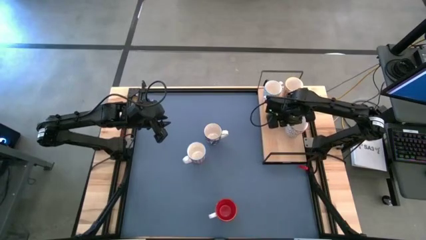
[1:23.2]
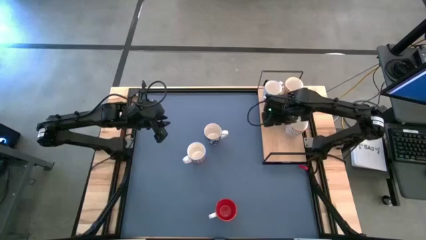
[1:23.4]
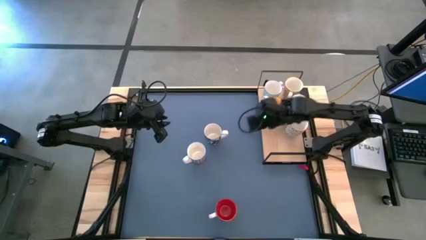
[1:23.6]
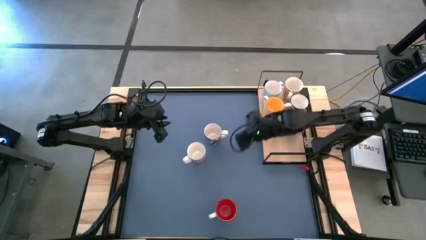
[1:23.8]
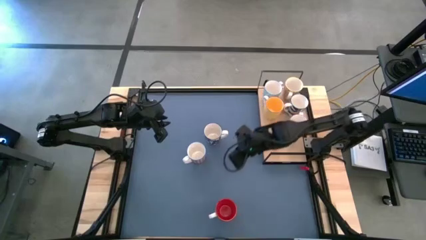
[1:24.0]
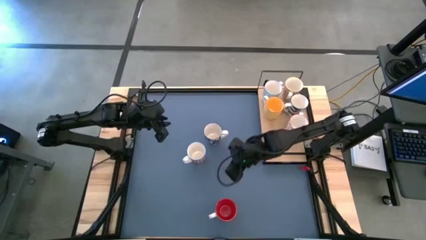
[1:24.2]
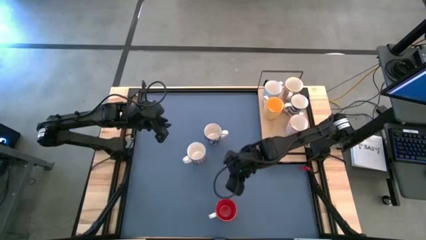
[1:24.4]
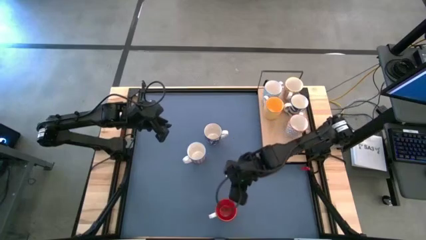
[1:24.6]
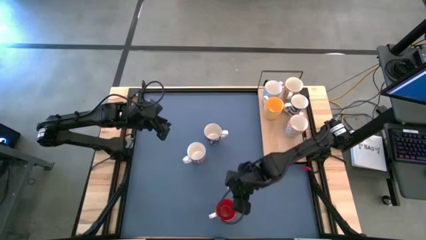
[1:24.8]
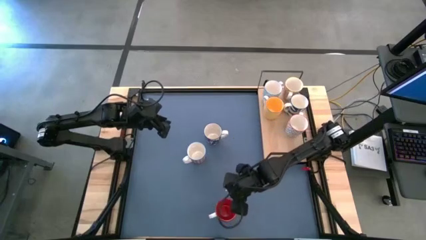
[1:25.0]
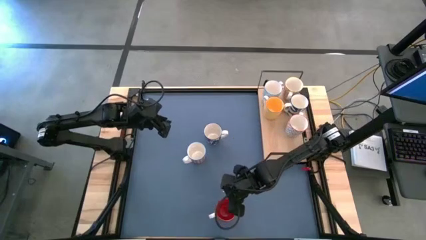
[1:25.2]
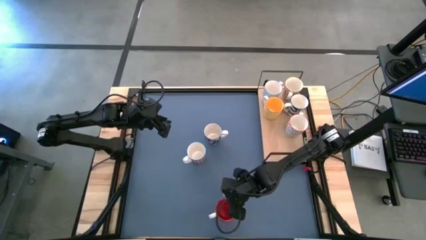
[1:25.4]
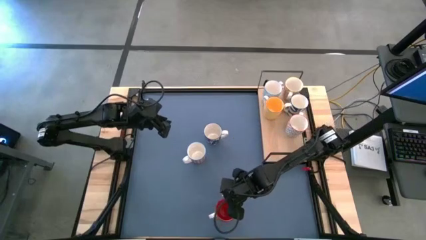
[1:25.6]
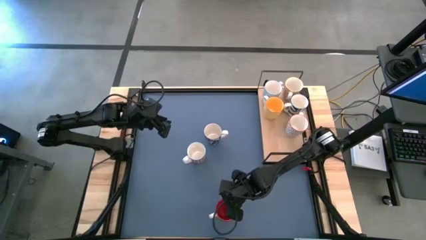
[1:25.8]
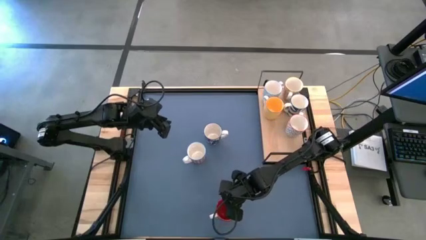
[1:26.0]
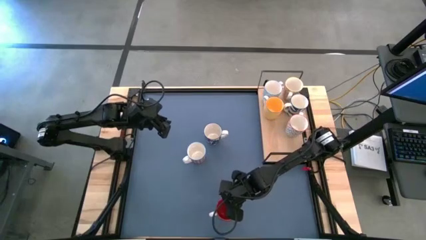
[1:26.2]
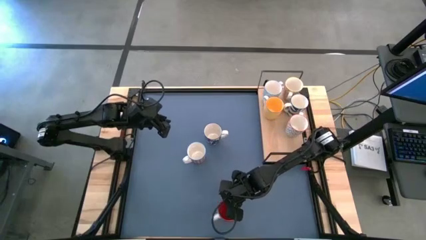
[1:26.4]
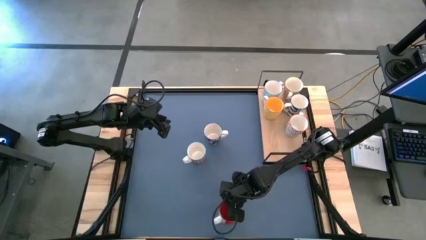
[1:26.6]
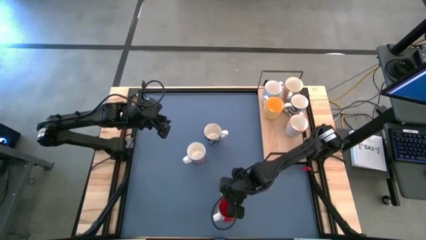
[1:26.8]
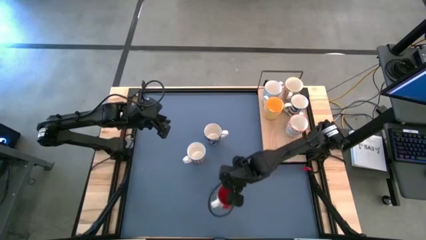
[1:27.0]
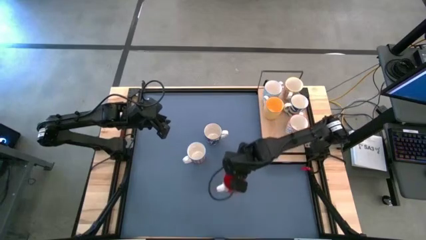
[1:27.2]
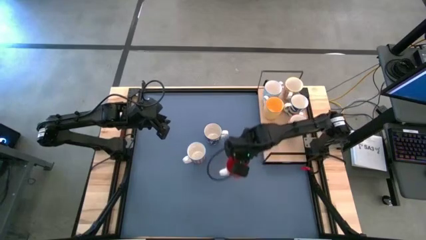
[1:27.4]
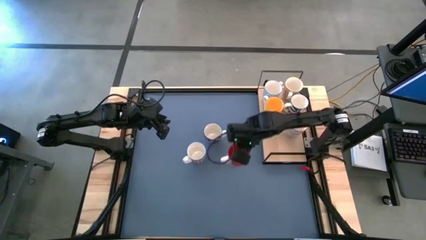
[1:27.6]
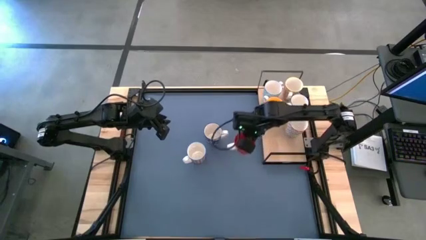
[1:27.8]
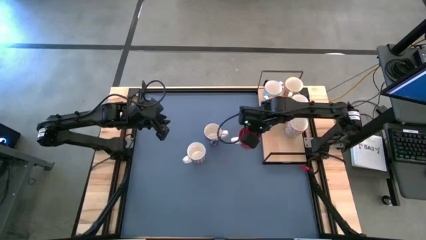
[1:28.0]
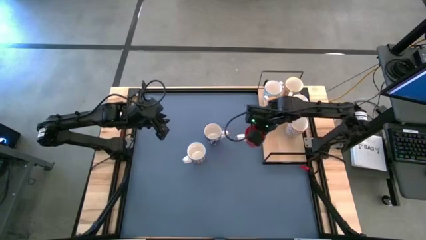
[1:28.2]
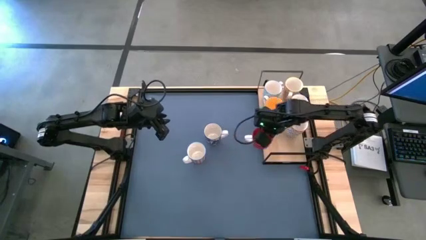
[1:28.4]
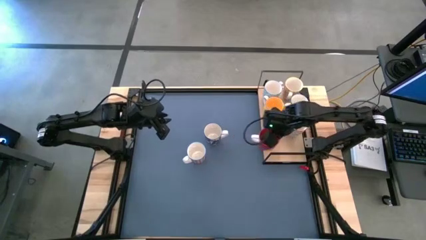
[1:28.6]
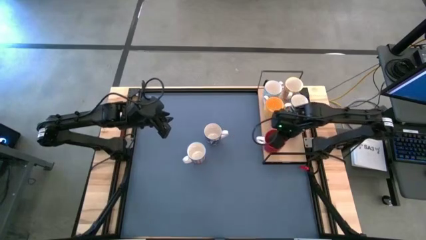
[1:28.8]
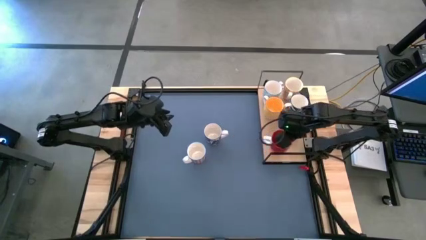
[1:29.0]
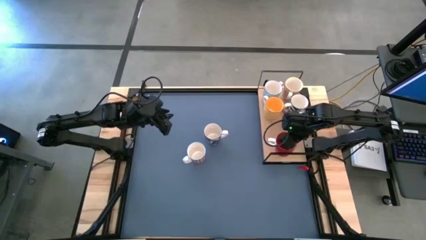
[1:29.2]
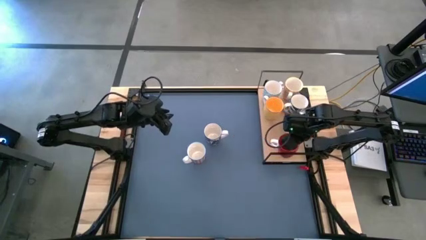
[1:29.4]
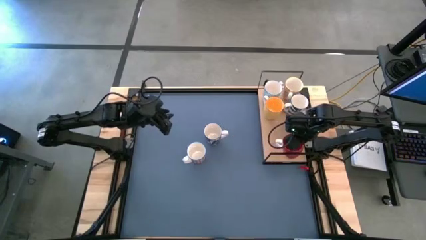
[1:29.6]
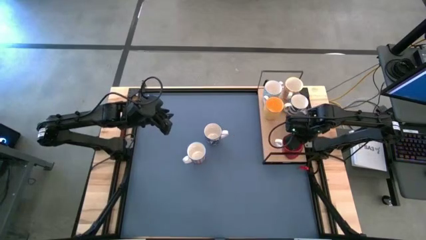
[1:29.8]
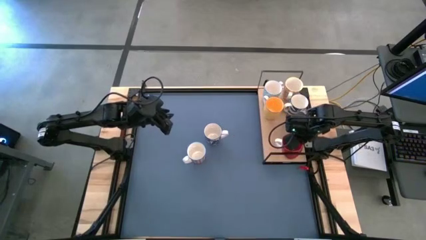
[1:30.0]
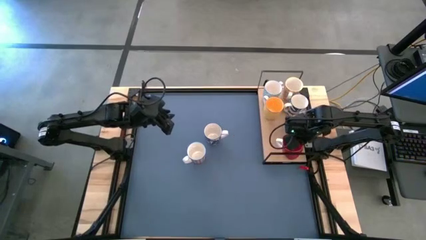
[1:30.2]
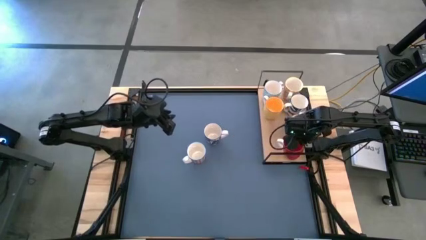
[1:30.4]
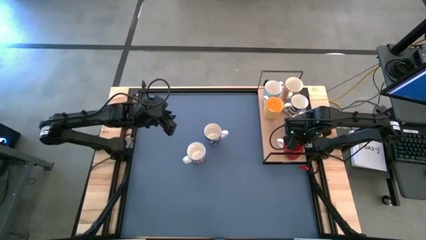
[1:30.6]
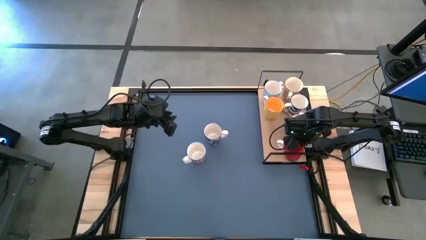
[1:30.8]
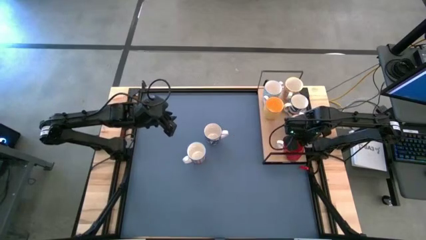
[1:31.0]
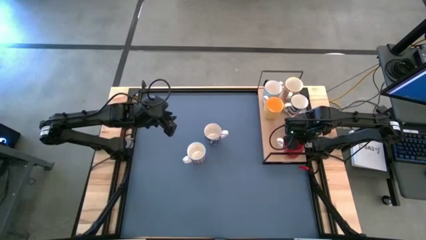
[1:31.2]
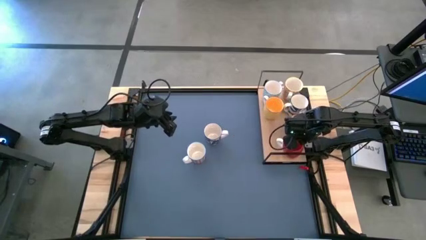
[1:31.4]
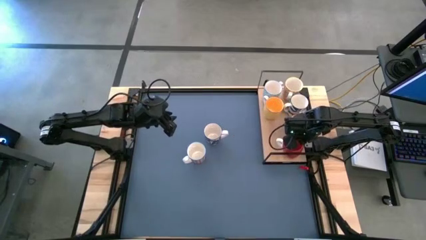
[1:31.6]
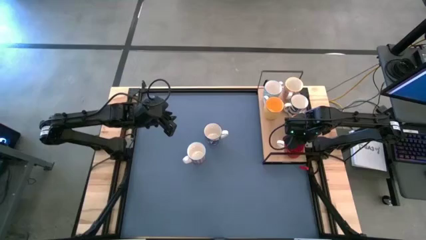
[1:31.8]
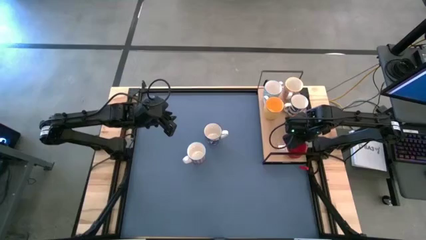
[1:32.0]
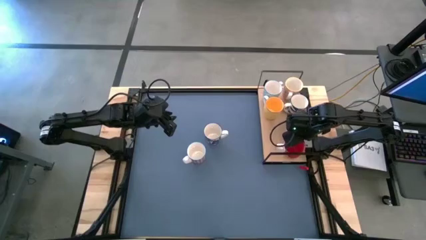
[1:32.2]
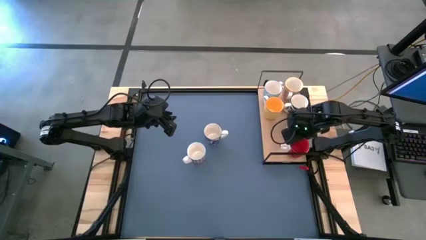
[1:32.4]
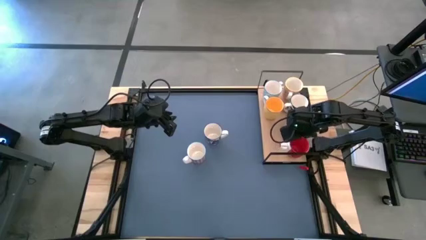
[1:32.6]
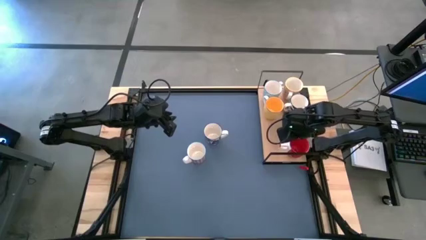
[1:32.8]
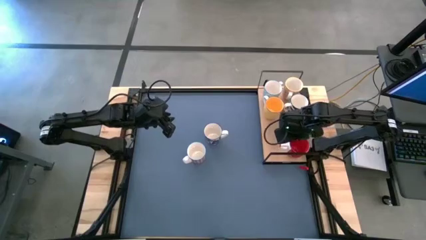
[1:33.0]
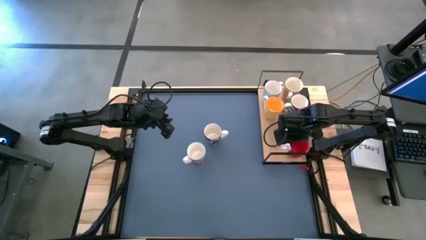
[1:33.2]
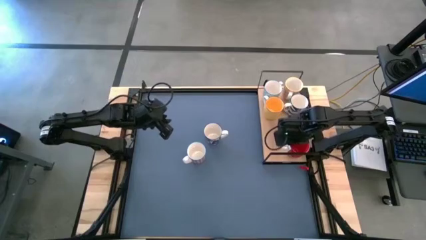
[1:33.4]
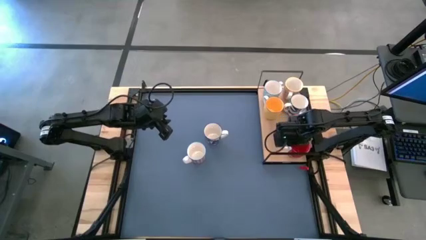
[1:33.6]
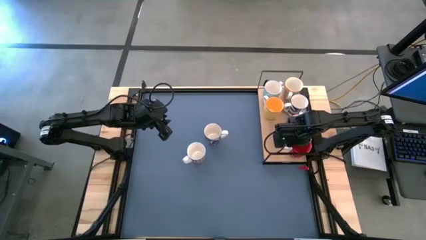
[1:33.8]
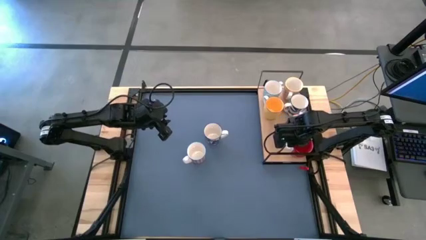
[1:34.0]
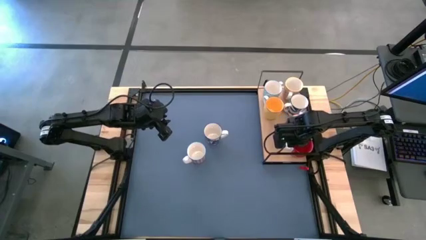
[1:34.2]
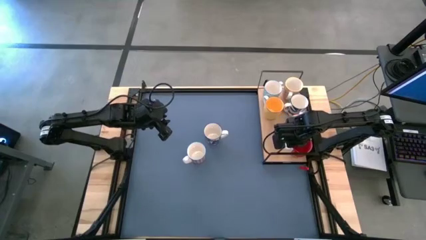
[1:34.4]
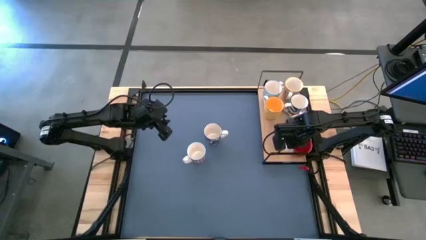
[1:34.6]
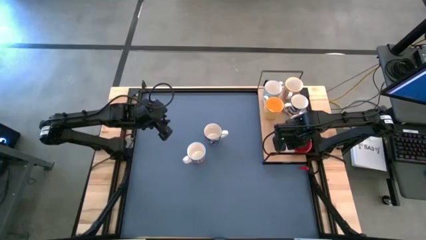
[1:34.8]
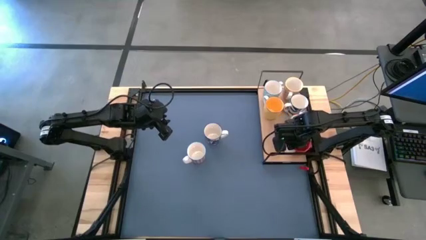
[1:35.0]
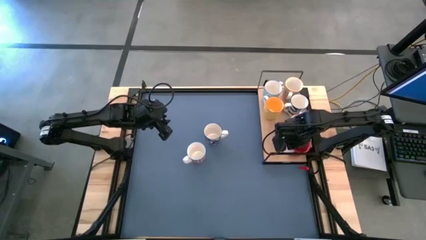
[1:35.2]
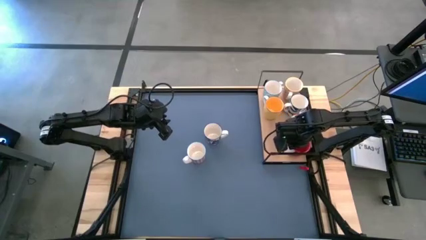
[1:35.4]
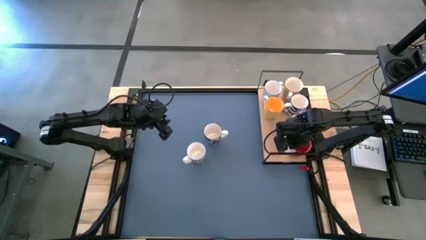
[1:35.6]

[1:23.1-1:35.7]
Task: Place coffee mugs
Put the red cup on the shelf aligned with the gray cup

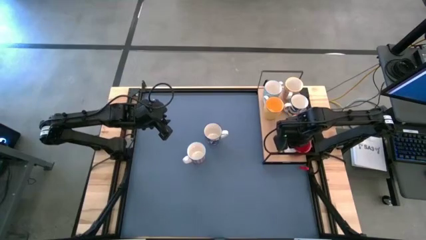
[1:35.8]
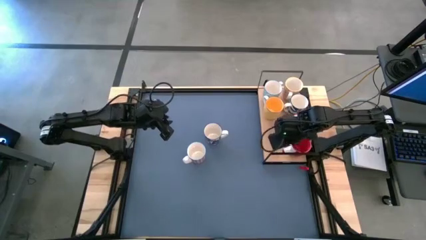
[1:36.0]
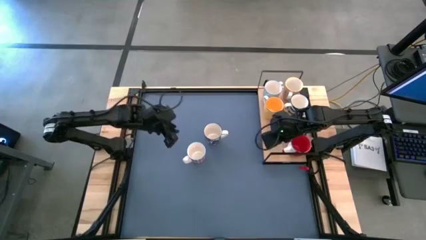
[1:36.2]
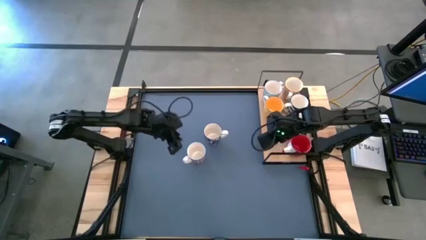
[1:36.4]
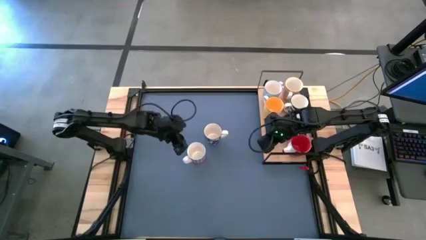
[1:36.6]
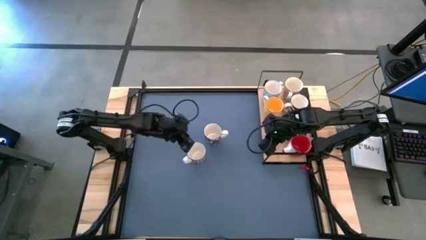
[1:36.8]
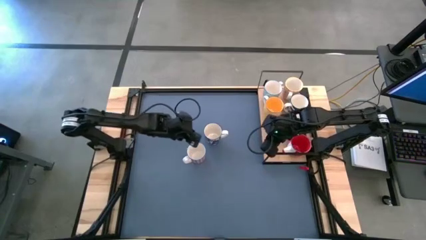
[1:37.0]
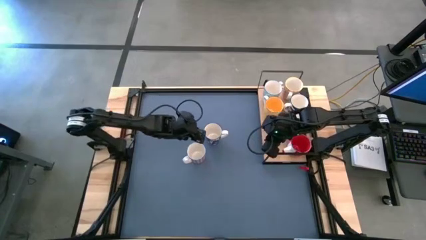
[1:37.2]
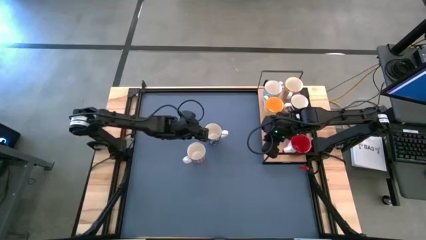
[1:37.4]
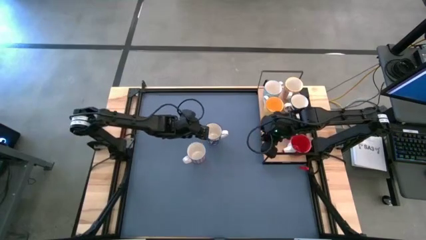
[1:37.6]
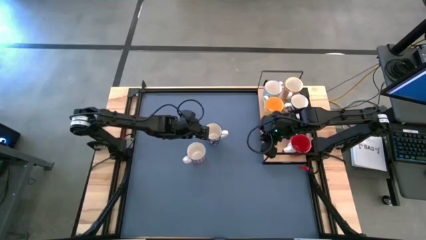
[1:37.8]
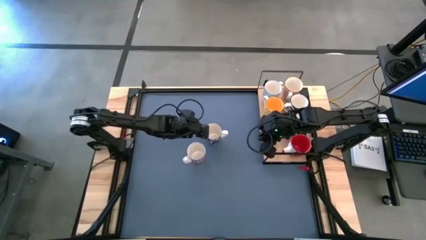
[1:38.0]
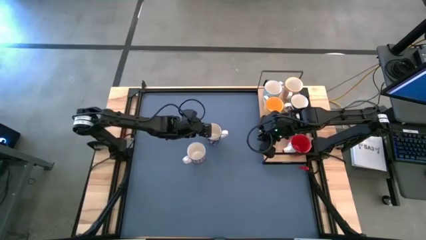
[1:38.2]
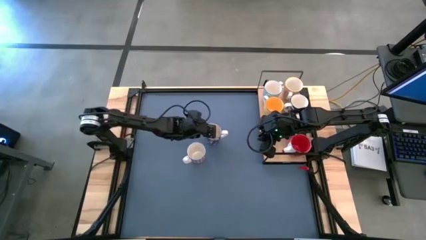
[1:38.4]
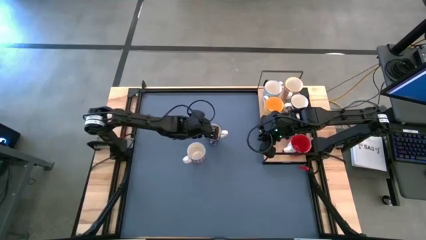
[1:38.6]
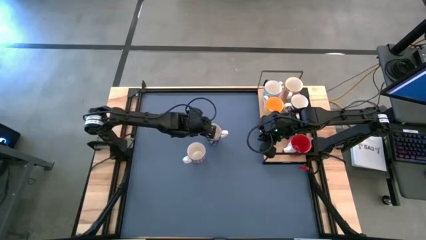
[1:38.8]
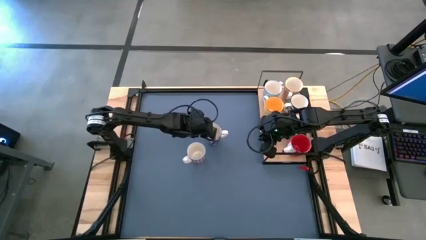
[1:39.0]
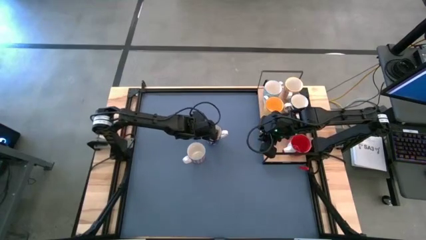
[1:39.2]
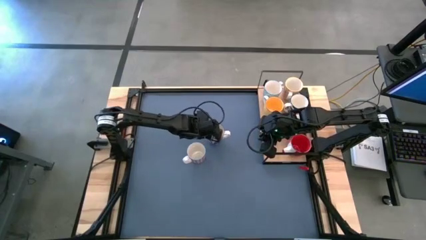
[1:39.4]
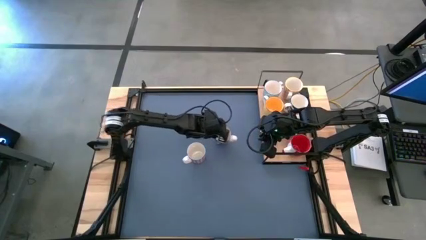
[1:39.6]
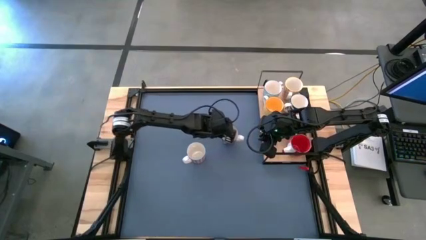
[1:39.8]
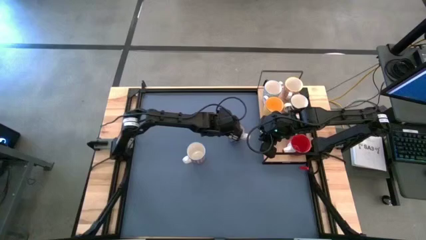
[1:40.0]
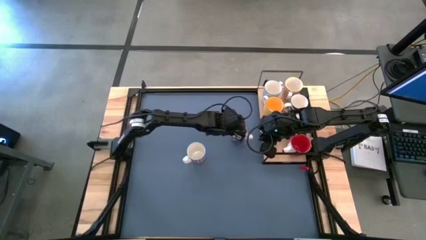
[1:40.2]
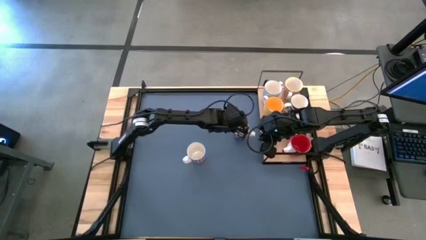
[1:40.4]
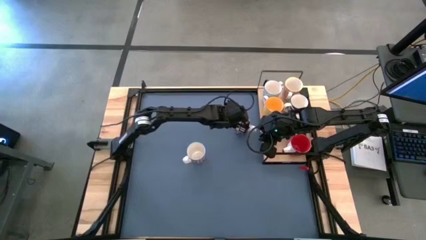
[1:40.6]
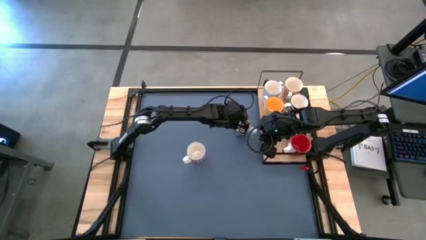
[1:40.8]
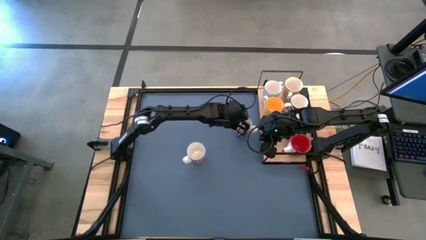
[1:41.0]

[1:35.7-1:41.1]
Move the blue cup to the top right of the table
